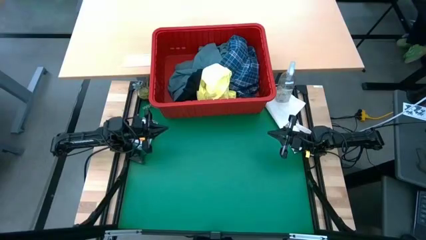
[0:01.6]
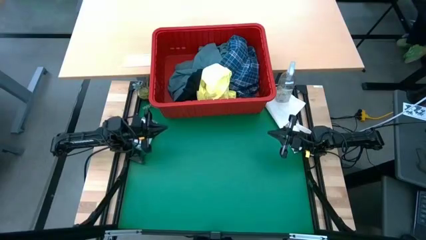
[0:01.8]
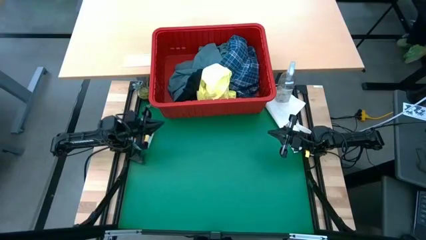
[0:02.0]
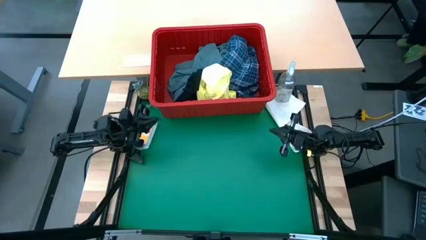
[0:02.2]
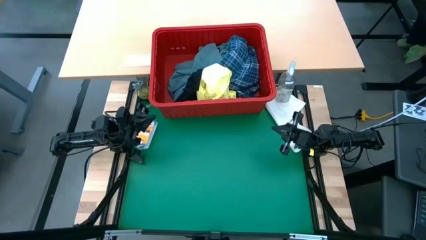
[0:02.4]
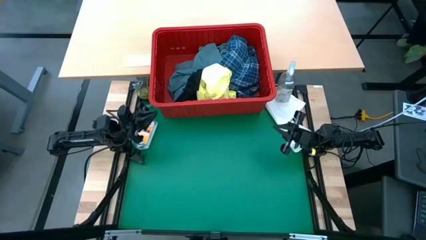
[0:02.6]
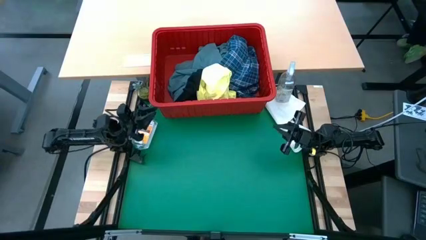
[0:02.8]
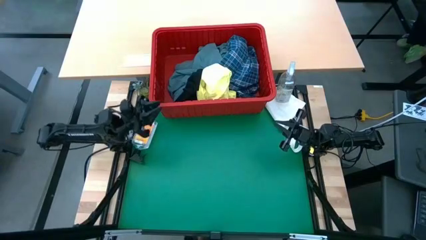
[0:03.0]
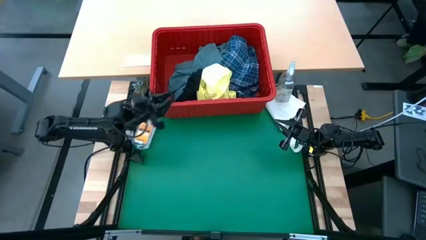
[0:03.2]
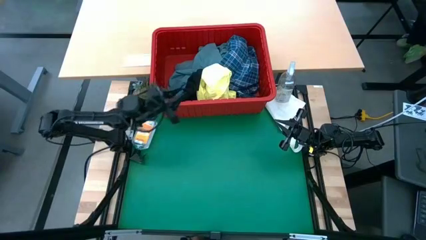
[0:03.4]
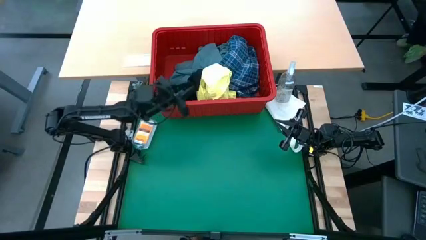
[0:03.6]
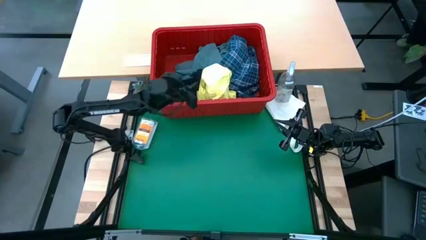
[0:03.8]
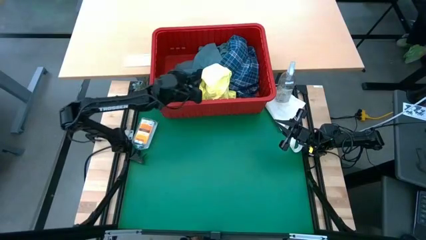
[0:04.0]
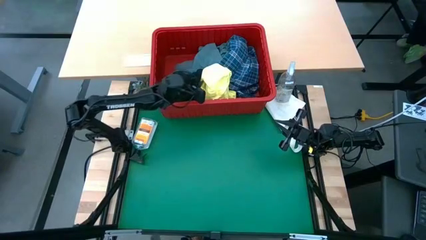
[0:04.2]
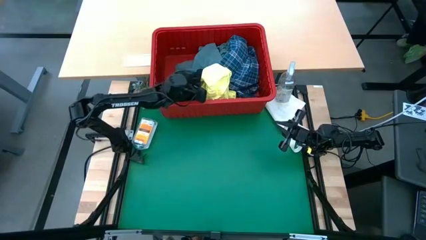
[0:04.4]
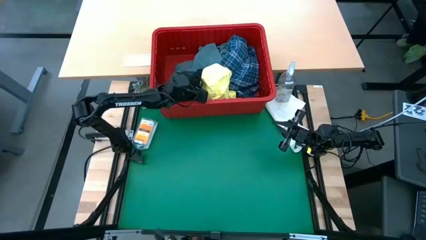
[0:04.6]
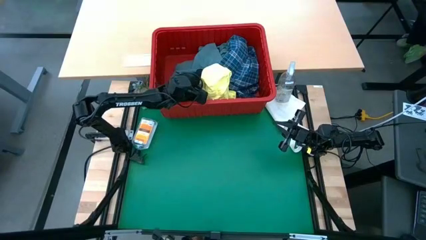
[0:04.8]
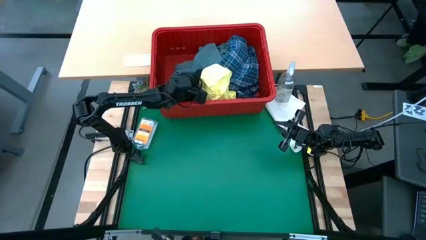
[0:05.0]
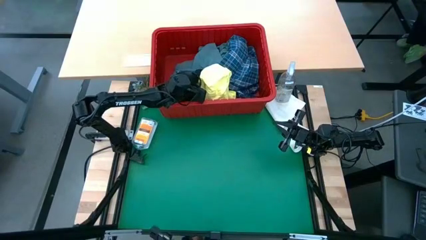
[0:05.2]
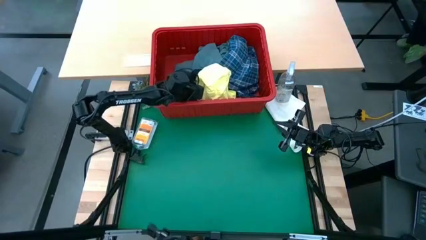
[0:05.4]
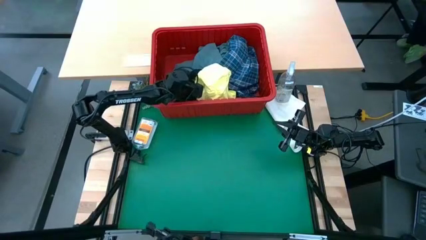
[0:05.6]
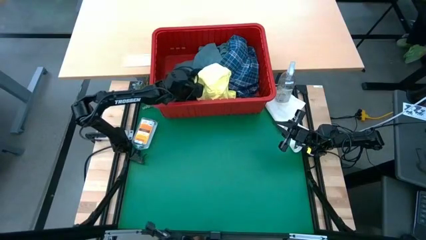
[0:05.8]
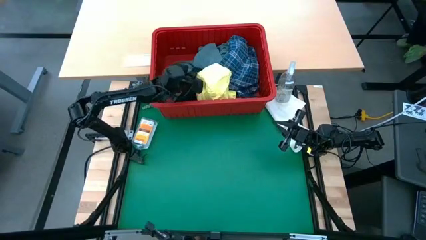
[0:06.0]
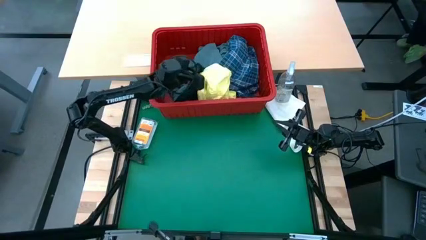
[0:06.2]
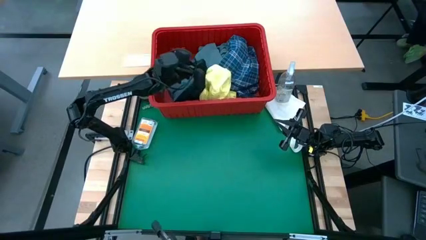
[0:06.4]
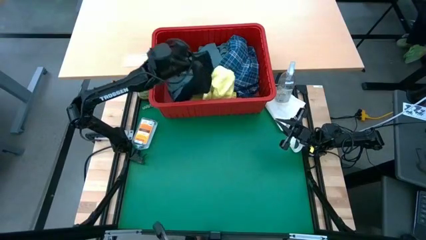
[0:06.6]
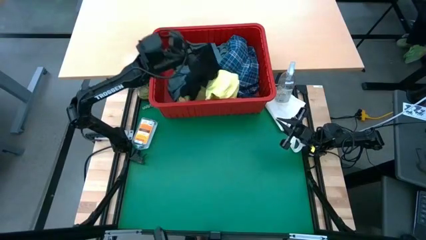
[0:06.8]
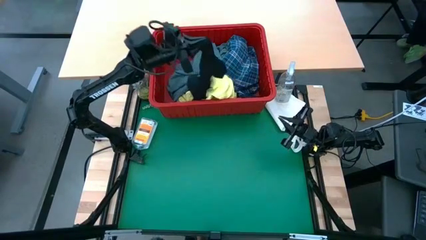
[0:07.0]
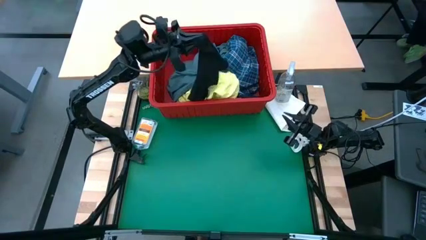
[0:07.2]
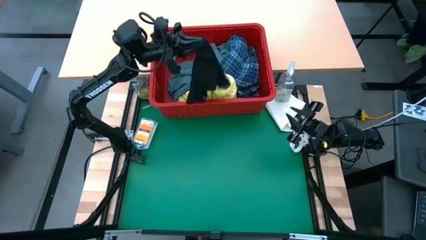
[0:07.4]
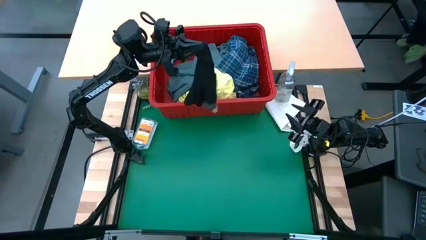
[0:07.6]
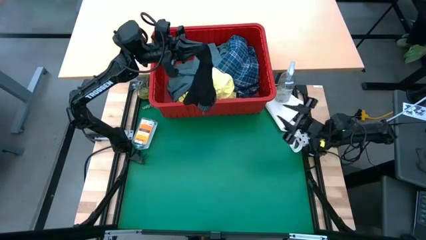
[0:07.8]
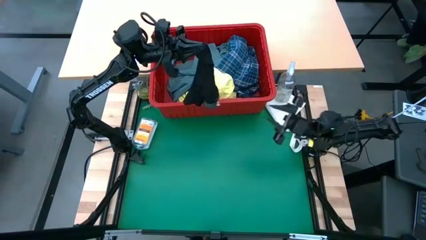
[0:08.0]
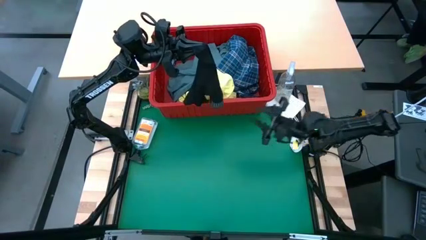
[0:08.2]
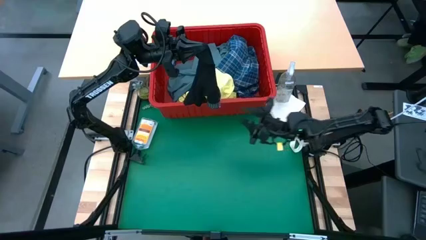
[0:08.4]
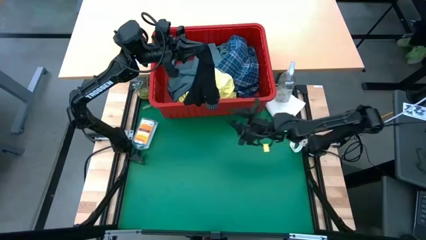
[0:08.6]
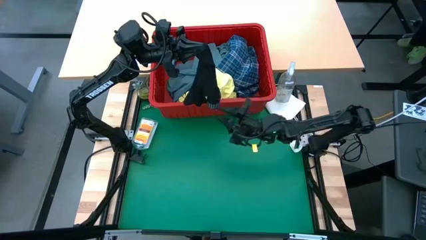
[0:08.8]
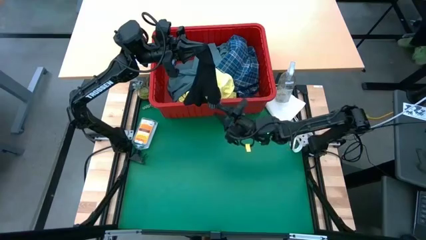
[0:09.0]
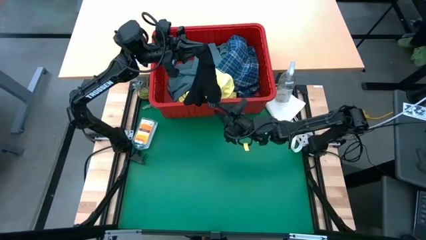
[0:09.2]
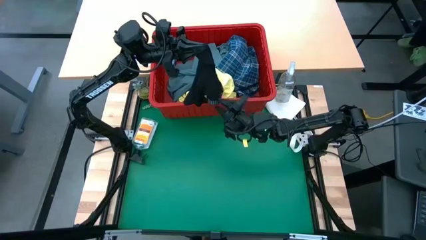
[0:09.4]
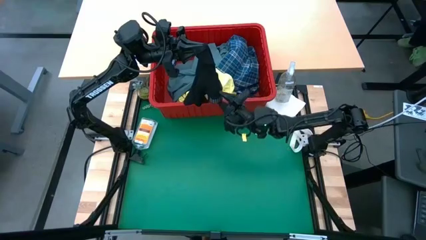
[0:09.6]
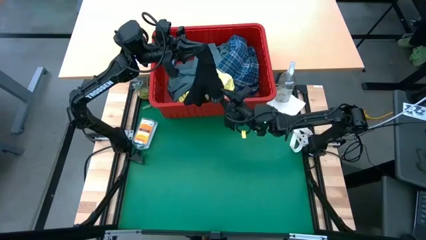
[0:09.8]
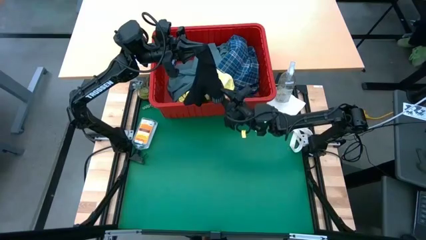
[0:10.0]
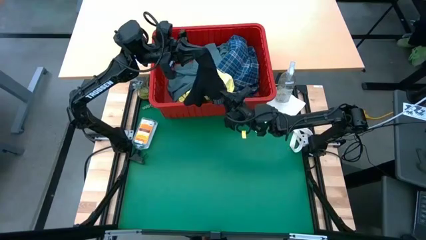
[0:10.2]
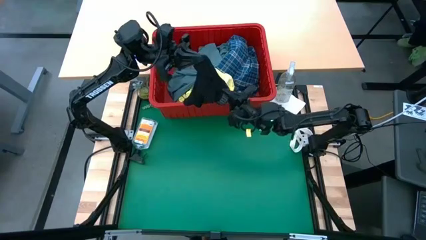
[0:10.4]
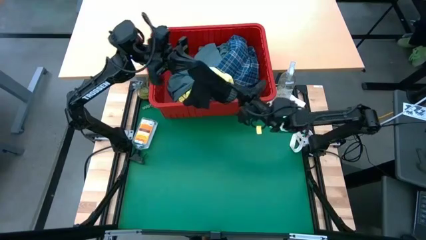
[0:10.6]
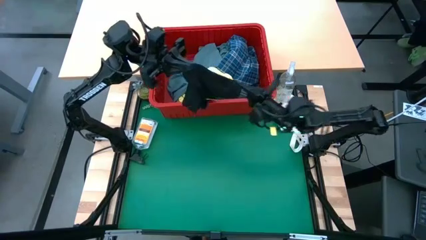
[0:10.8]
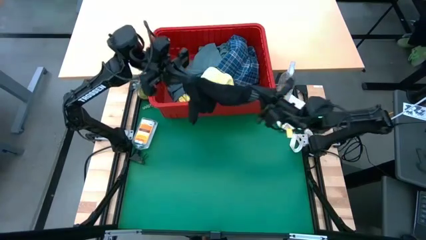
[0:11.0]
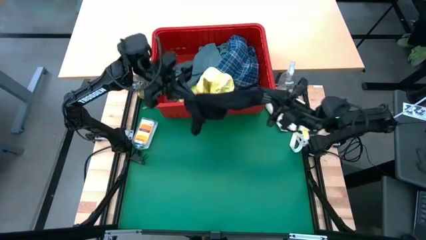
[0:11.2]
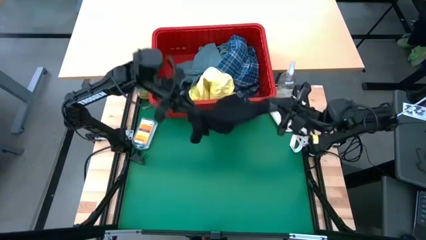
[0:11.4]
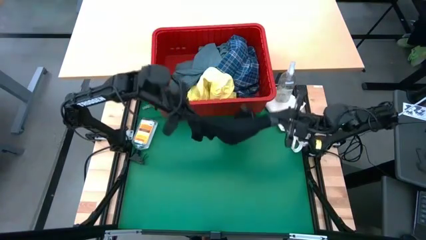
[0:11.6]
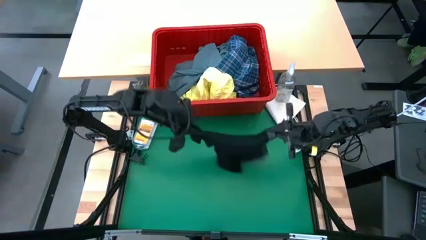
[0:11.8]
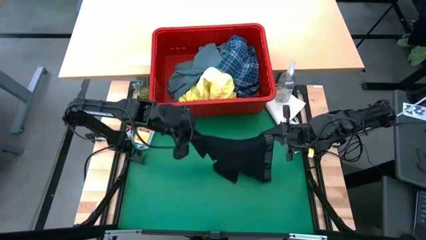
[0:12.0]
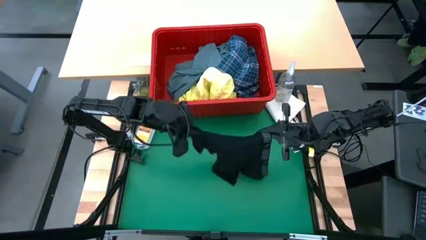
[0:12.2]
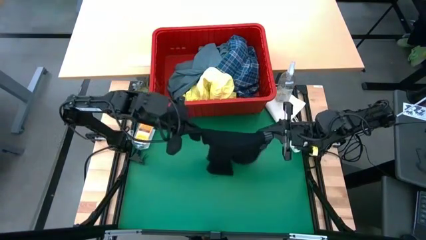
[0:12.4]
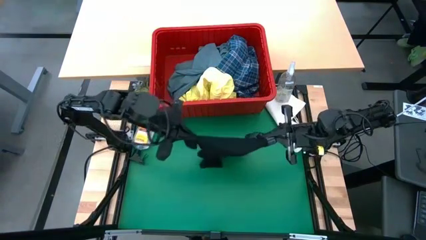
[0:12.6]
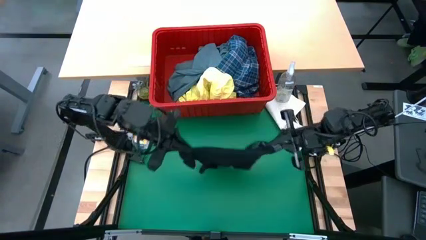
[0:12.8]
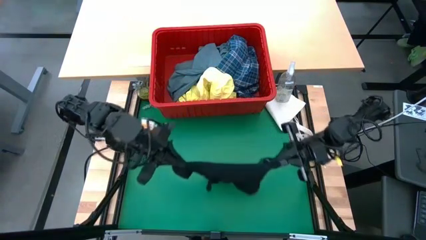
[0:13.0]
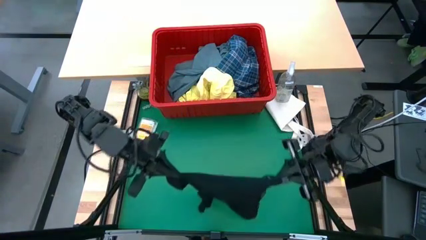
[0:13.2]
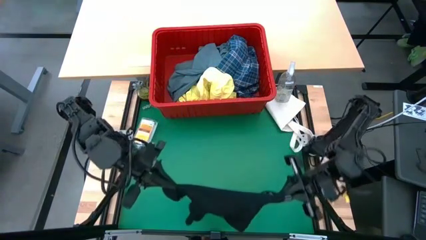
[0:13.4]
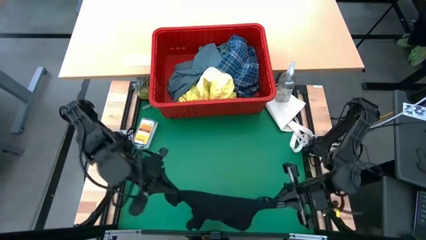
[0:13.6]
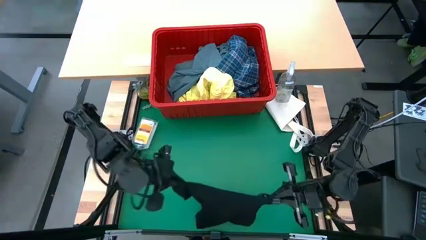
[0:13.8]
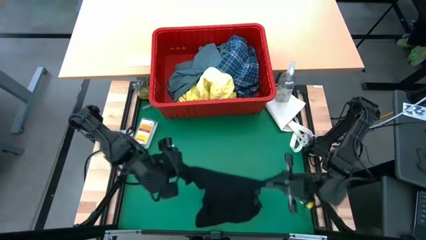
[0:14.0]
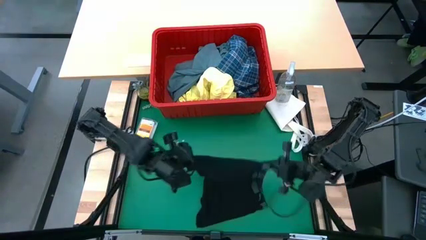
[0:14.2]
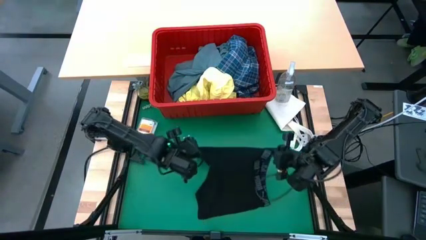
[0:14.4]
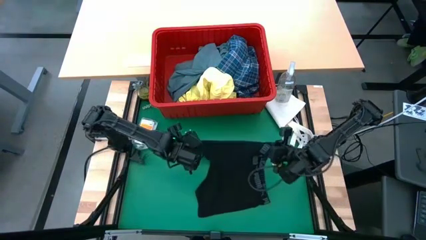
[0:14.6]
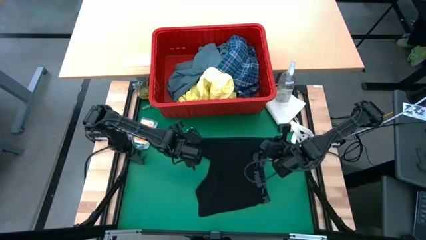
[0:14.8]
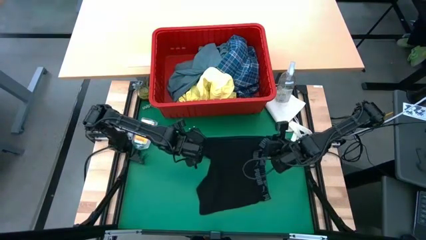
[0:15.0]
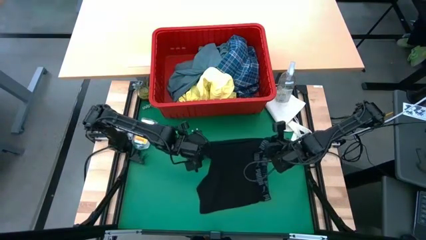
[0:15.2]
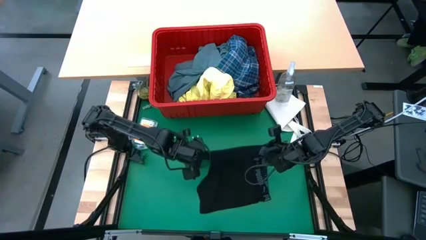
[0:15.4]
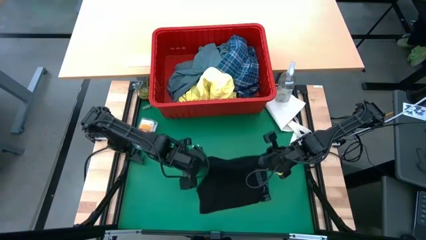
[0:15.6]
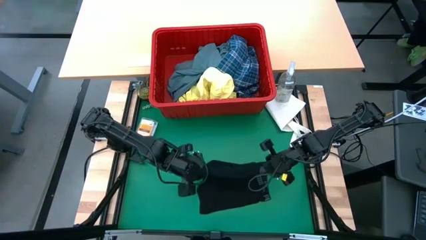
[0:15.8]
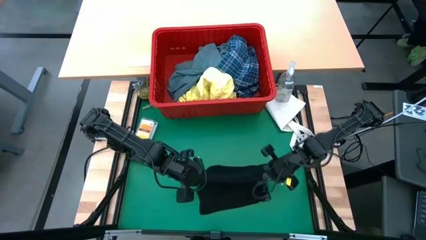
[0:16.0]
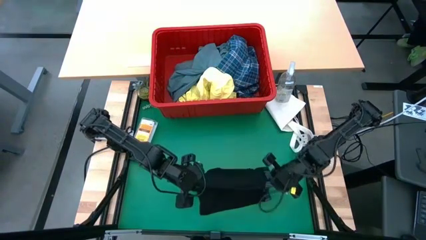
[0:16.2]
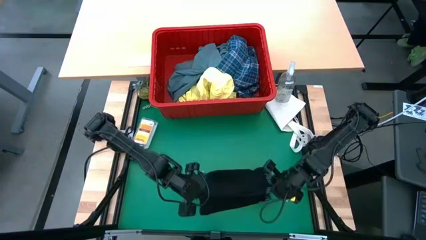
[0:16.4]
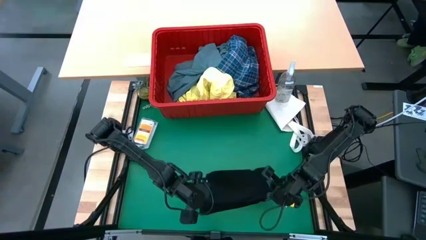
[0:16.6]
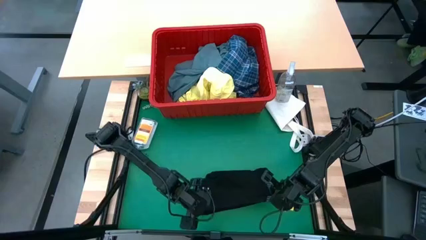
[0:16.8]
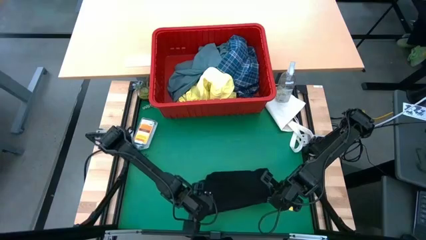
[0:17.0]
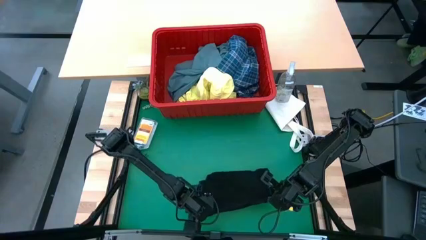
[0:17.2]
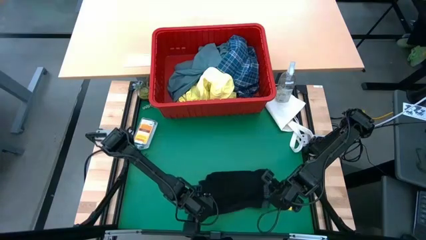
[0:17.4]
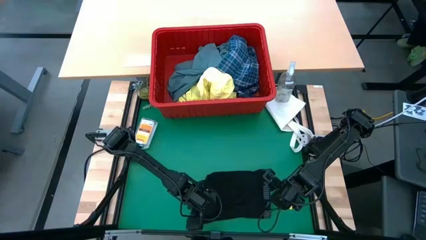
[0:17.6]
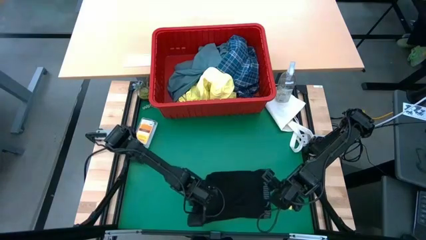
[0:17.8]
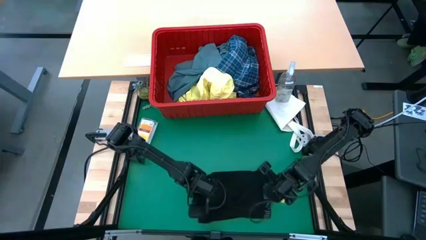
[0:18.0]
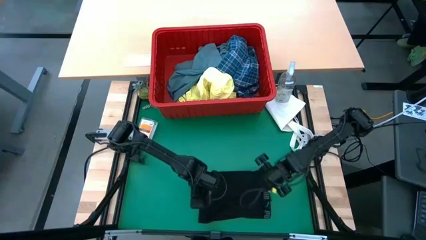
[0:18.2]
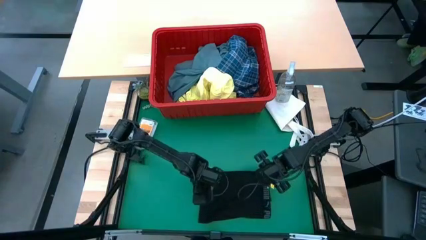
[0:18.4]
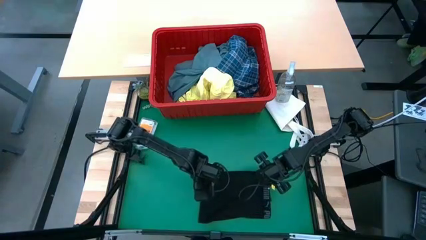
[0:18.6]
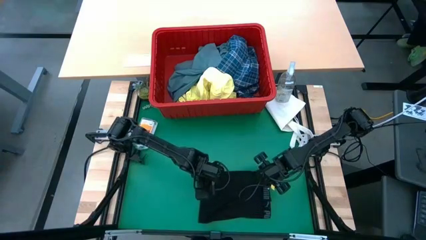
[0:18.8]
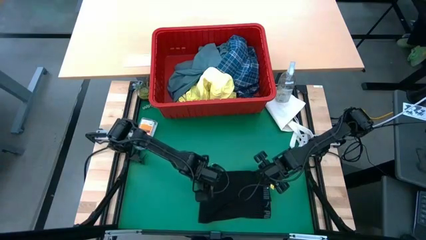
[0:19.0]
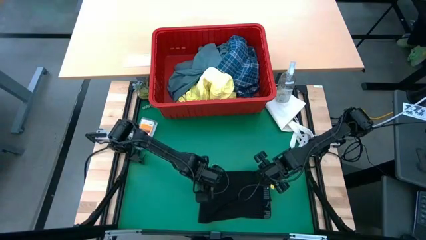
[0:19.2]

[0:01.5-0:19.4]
Task: Fold Laundry from Bin
Fold the black underwear shorts
